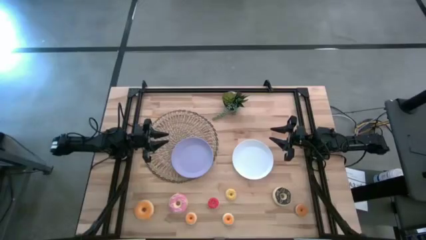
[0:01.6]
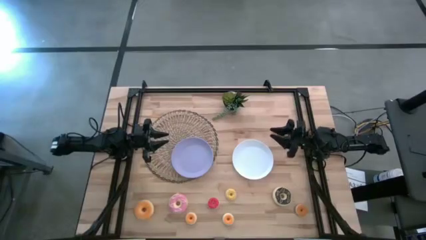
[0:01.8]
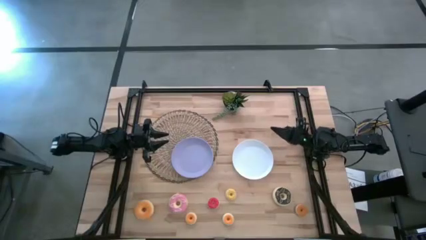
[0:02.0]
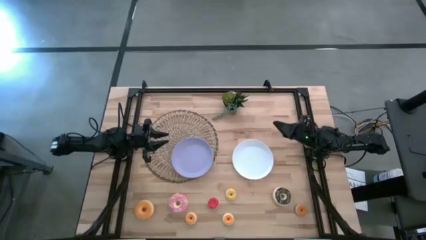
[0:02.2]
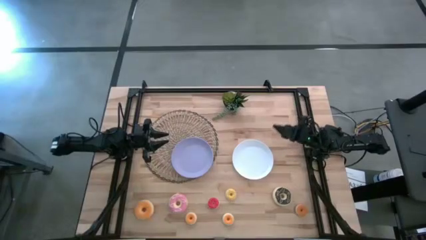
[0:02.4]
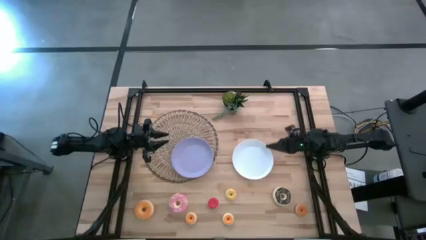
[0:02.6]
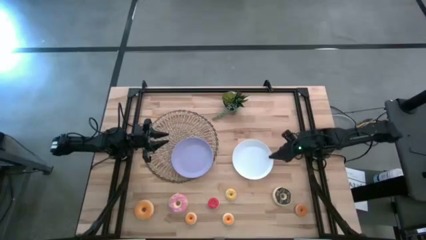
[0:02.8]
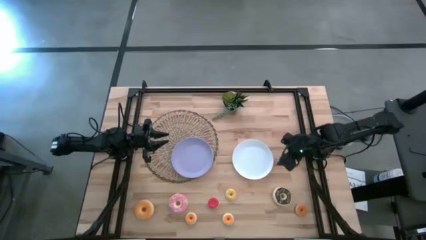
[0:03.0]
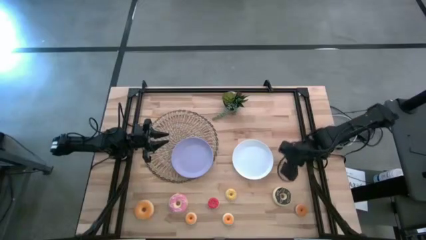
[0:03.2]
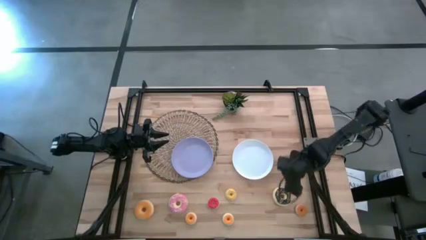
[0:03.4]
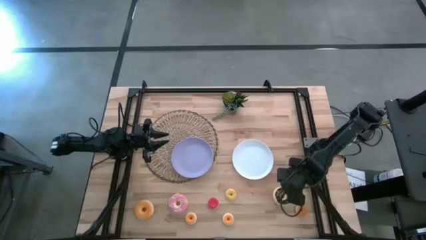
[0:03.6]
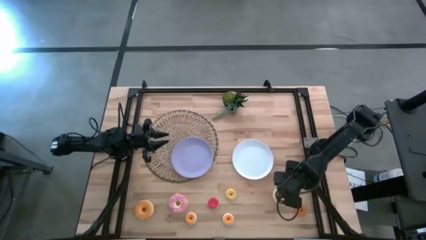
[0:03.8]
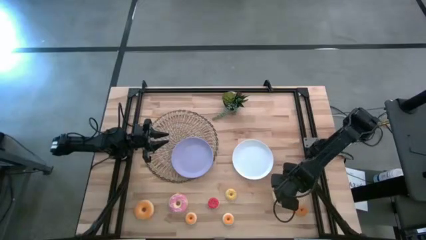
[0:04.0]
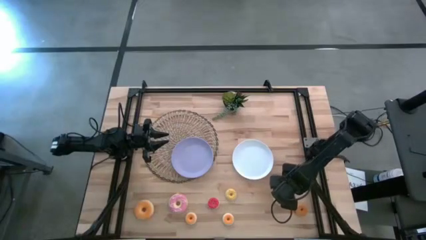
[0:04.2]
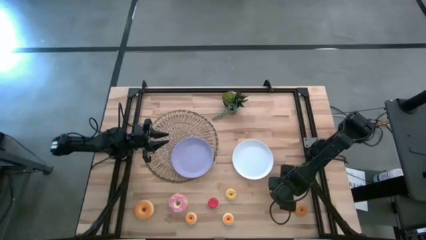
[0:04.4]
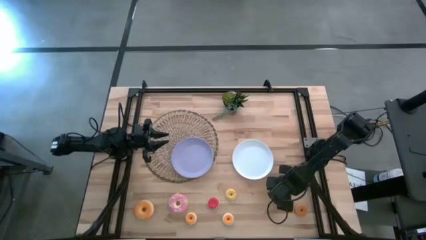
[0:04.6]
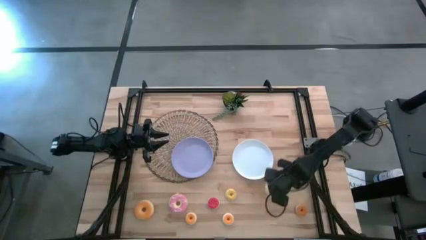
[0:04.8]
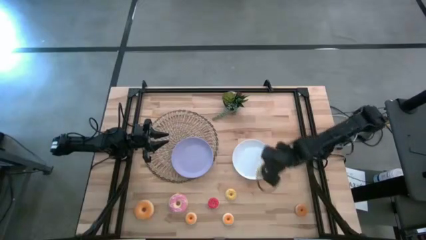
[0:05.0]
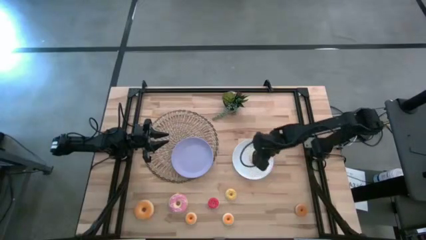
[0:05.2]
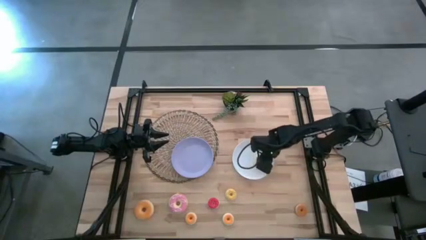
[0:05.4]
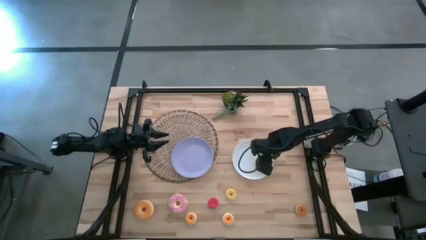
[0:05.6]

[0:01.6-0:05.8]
Task: Pick & Place donuts
Put the large black donut on the white plate

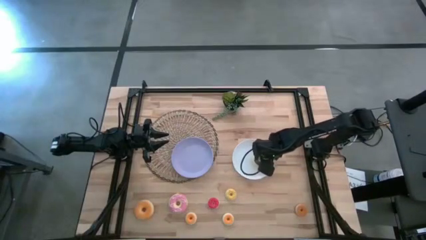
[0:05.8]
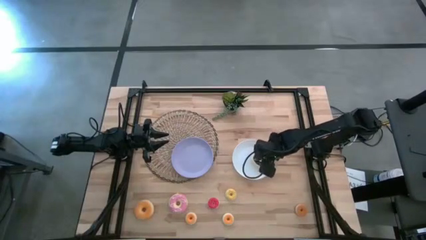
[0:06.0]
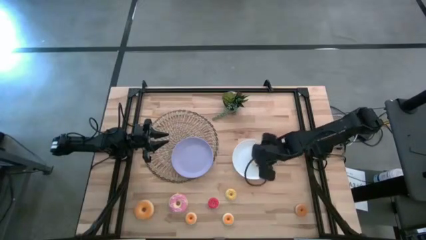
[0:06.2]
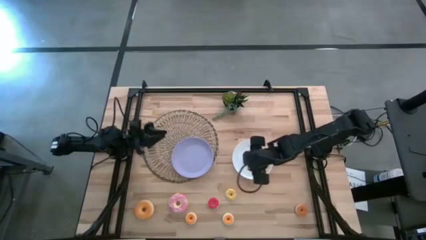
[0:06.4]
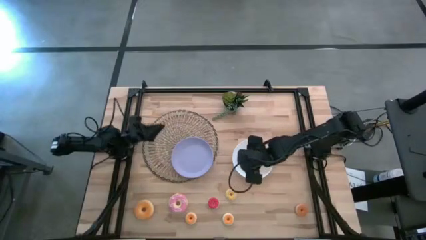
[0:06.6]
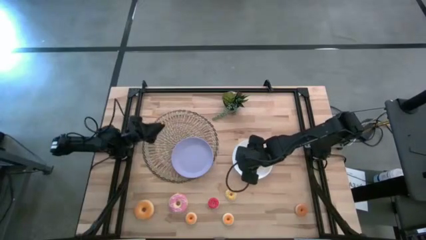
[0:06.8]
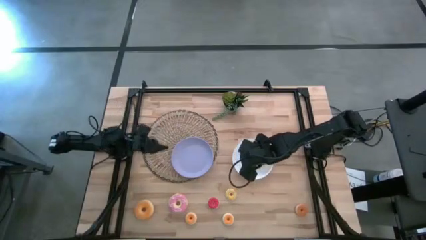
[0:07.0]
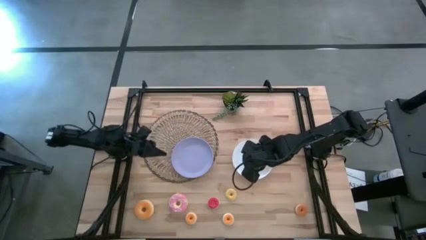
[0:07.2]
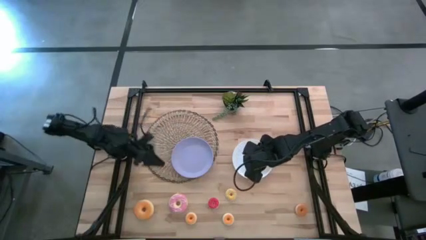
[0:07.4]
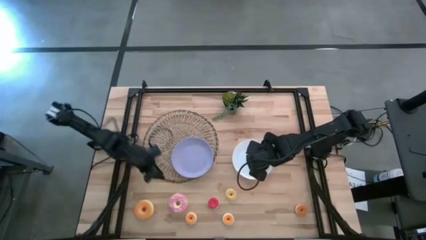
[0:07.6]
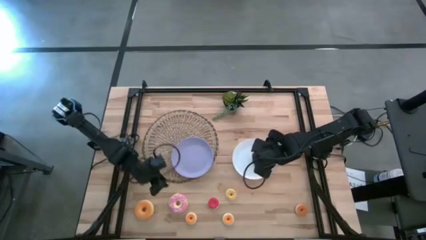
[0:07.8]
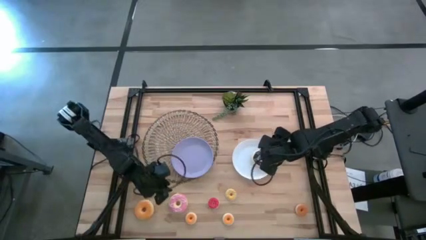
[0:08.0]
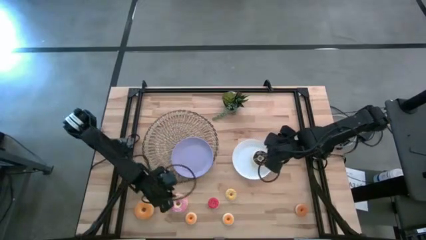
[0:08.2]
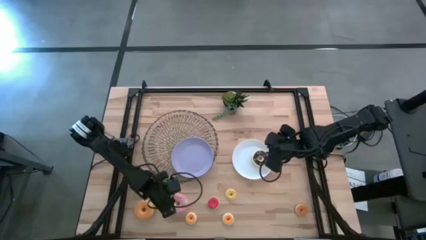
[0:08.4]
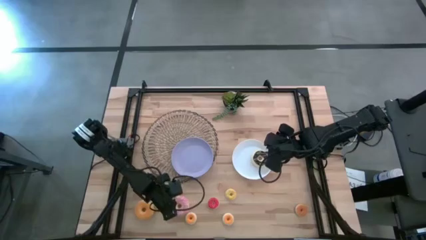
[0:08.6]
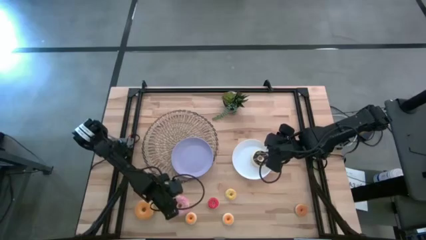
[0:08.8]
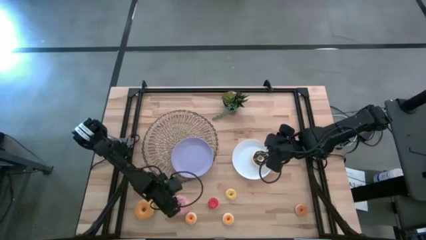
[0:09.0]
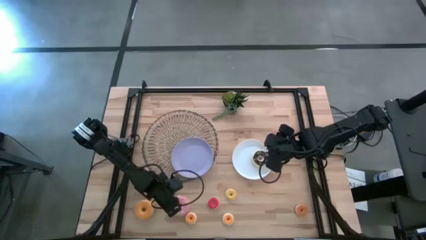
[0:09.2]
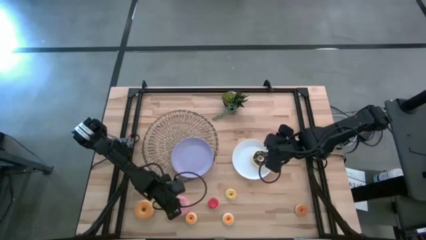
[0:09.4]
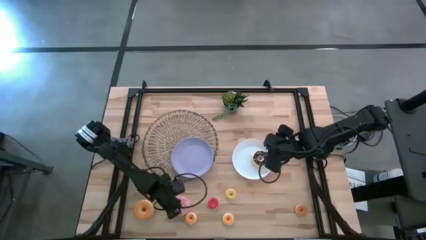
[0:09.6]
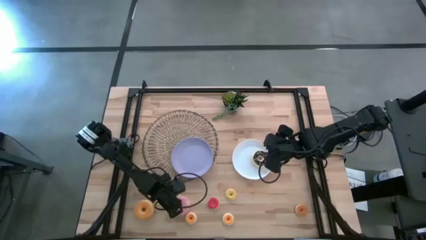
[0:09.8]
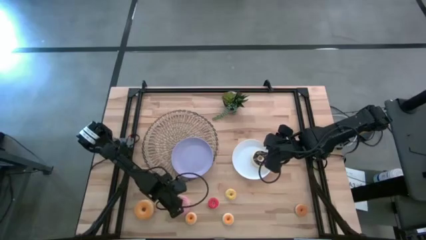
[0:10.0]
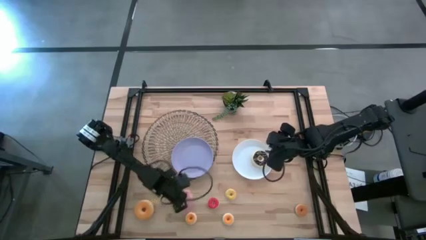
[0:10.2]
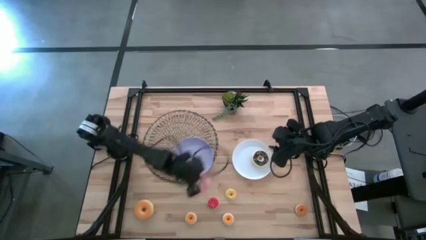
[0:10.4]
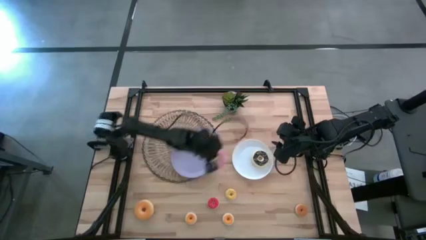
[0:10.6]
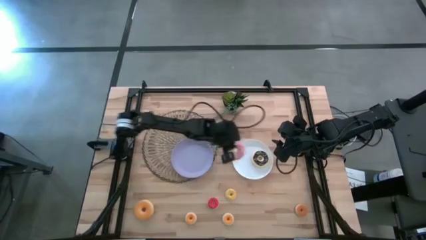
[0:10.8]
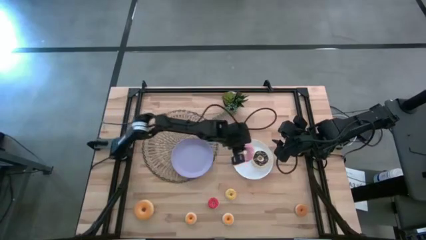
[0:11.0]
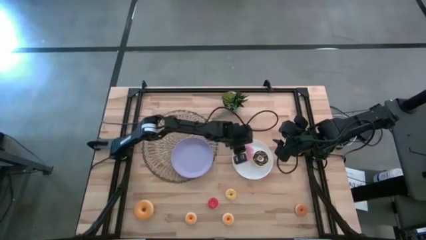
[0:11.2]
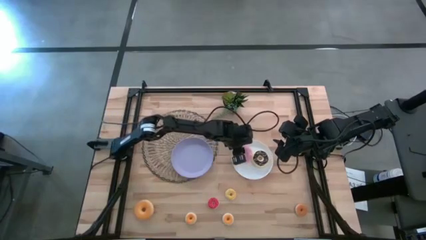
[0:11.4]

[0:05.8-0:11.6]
Put the large pink donut on the white plate

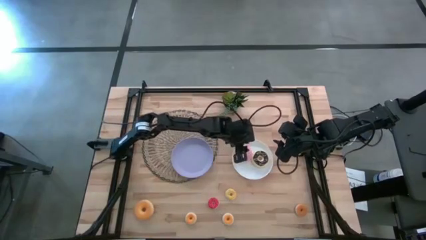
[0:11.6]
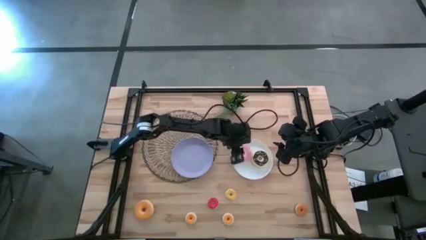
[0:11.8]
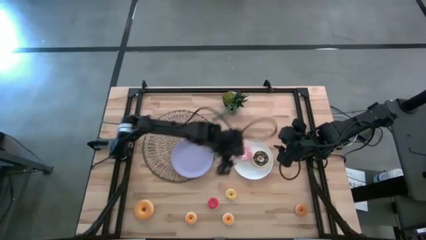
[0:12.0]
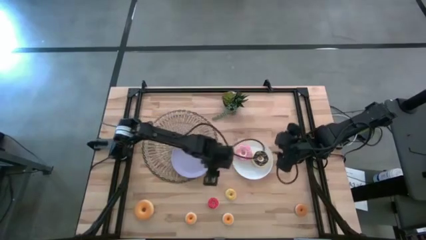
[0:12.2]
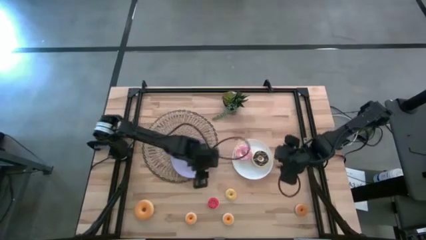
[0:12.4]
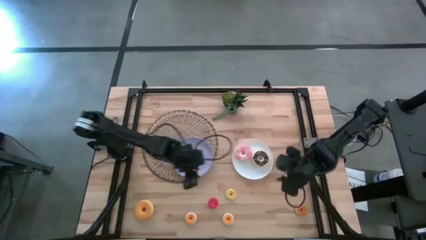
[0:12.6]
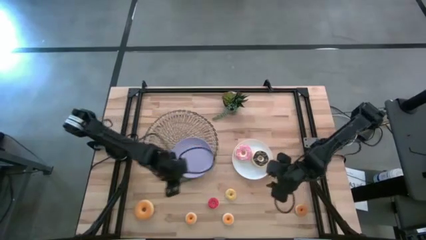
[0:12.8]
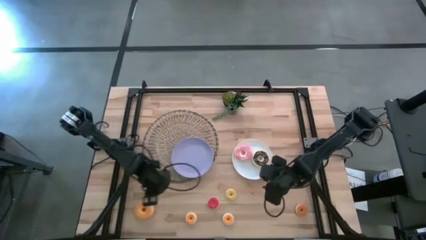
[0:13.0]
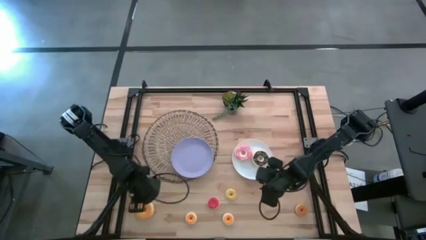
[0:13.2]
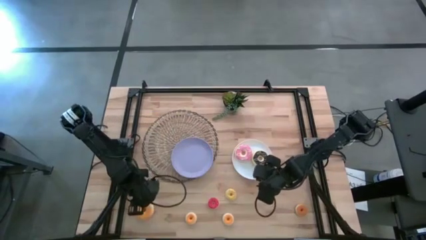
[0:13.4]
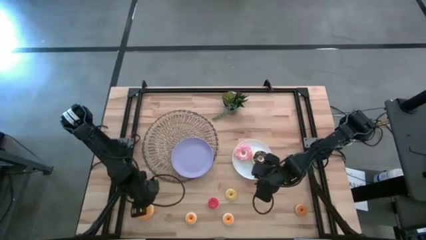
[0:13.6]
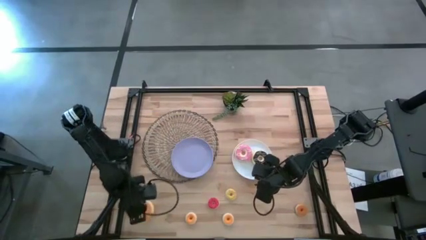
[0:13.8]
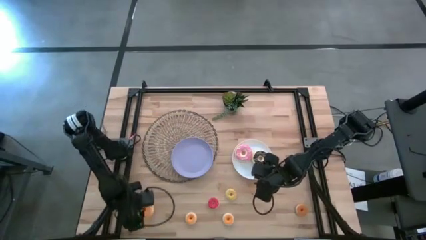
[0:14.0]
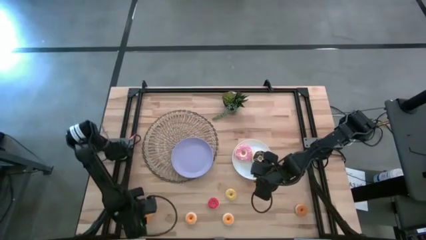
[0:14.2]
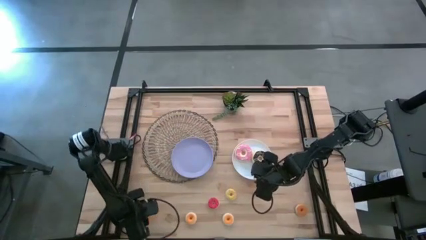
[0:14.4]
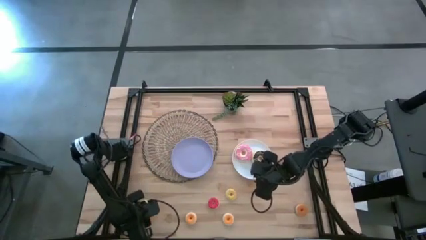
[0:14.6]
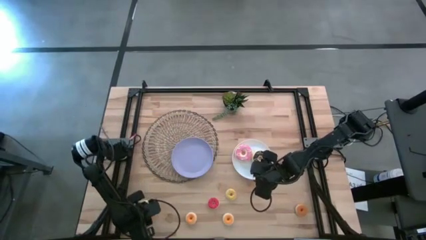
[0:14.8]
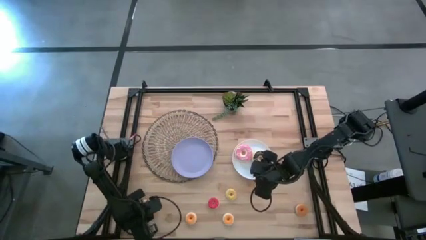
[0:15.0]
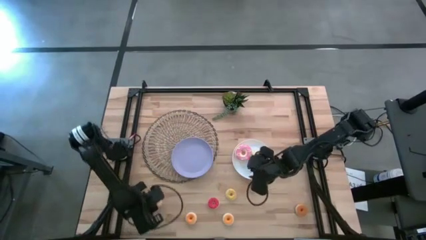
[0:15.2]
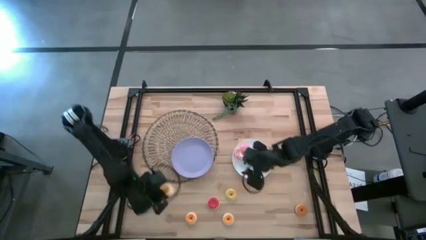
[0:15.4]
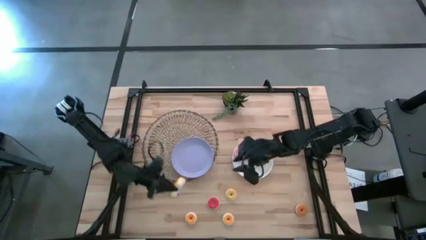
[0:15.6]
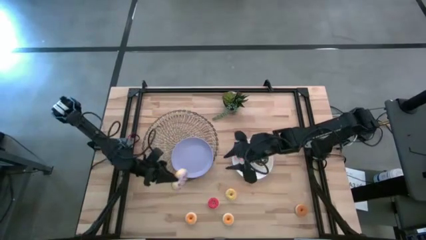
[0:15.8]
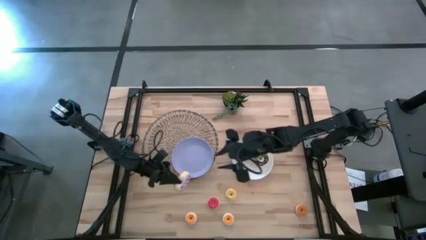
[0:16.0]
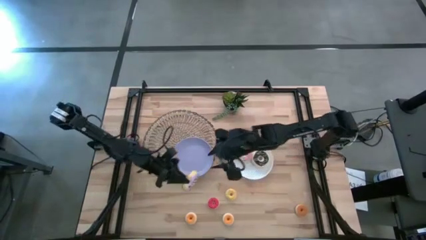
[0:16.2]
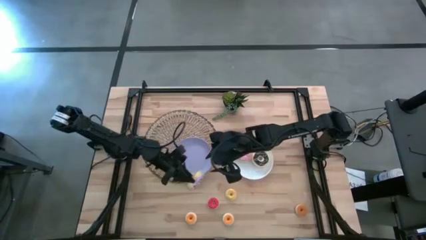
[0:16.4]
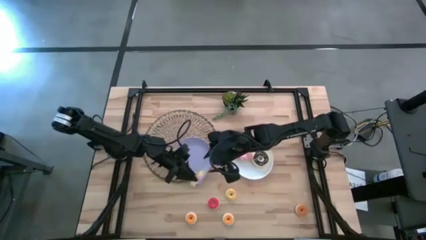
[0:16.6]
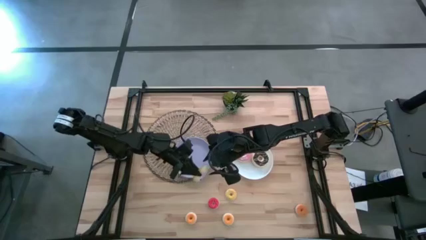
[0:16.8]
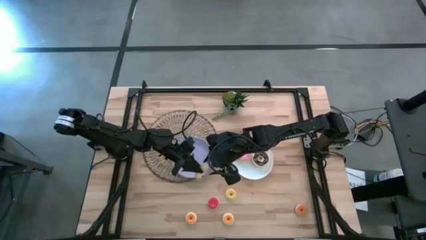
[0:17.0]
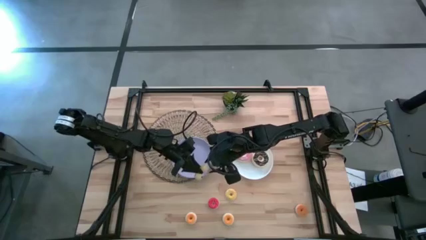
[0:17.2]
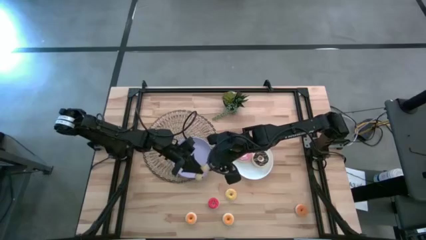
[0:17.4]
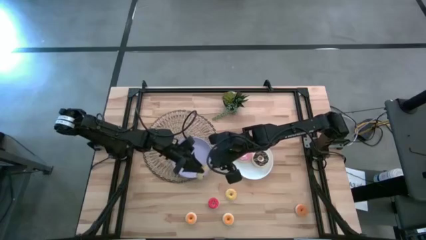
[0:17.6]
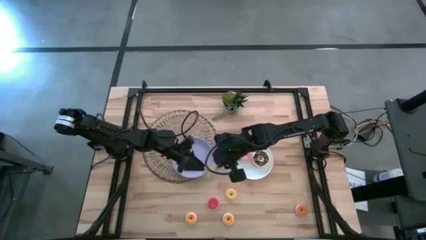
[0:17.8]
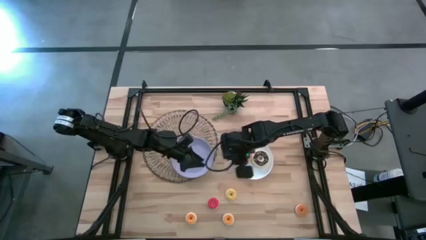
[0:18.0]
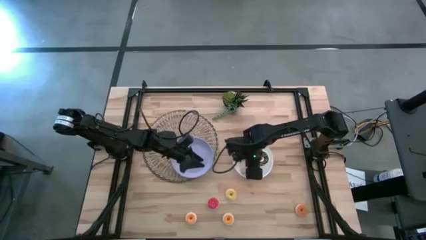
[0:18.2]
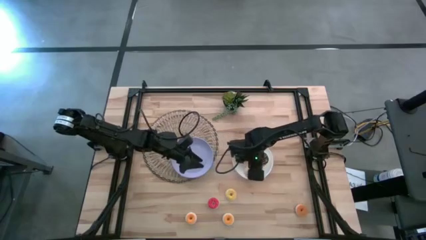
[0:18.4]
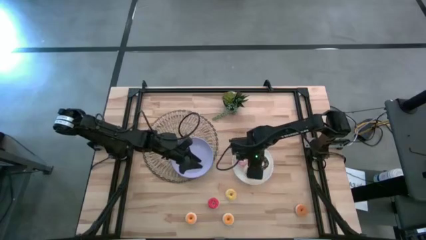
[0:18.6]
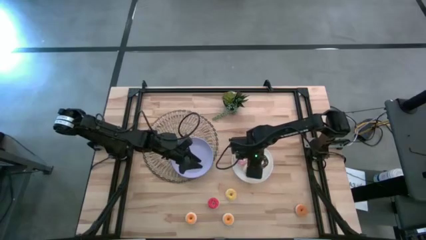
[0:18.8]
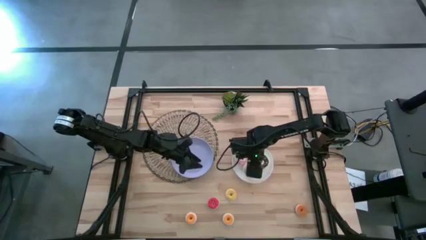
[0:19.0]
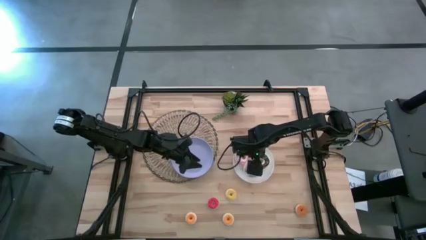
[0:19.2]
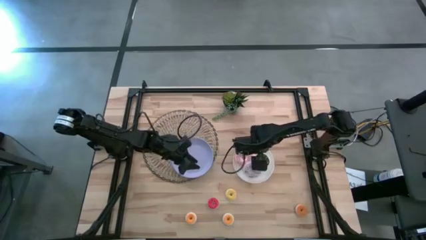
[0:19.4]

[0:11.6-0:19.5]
Put the large purple donut on the white plate
